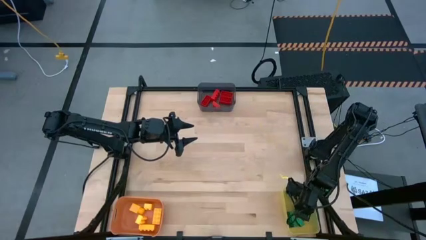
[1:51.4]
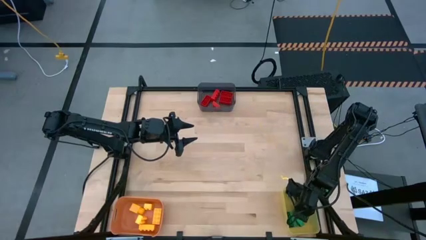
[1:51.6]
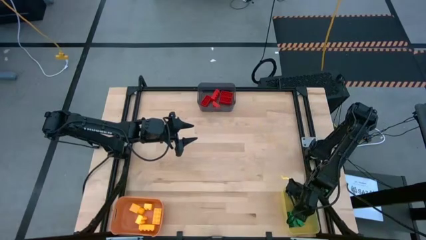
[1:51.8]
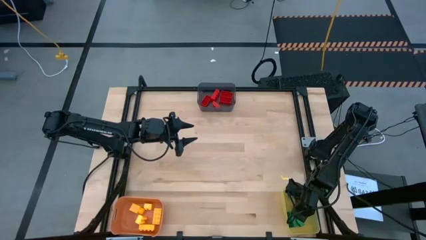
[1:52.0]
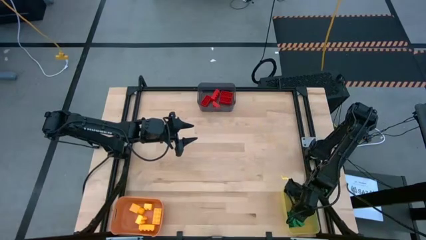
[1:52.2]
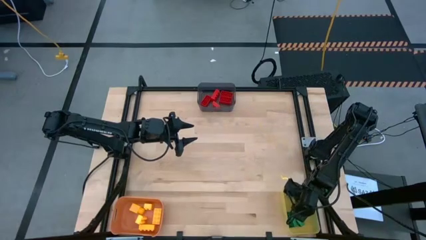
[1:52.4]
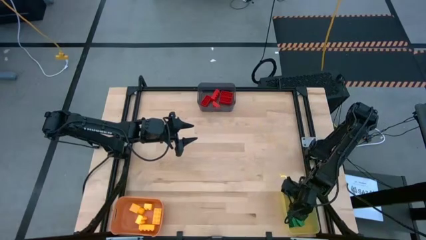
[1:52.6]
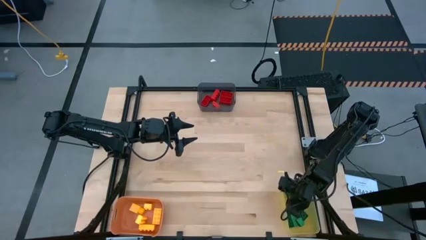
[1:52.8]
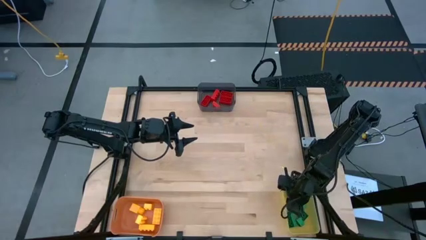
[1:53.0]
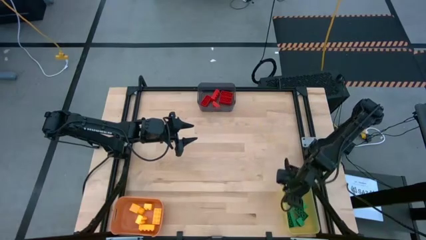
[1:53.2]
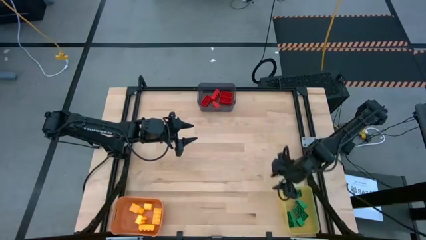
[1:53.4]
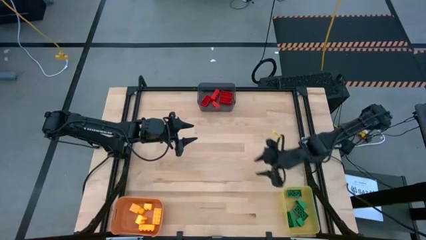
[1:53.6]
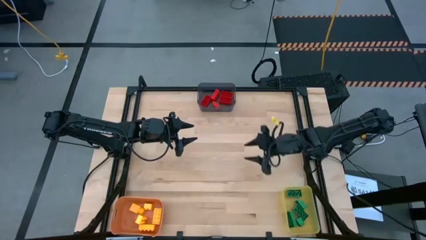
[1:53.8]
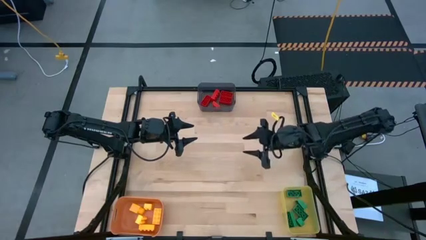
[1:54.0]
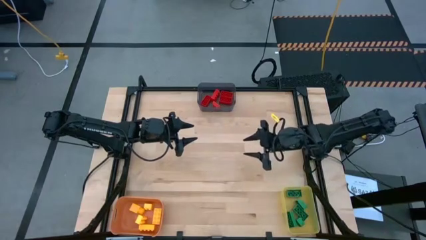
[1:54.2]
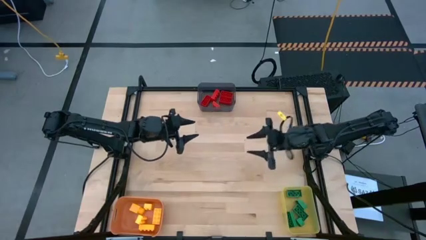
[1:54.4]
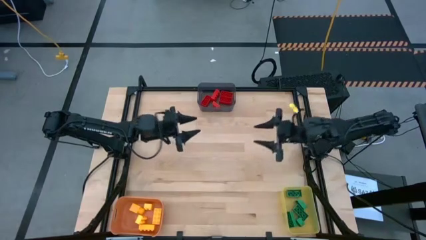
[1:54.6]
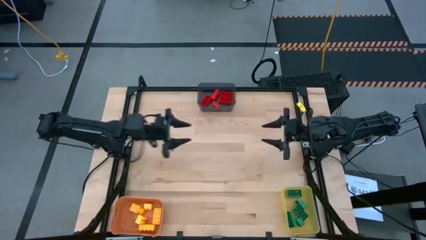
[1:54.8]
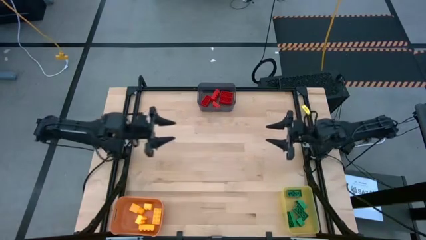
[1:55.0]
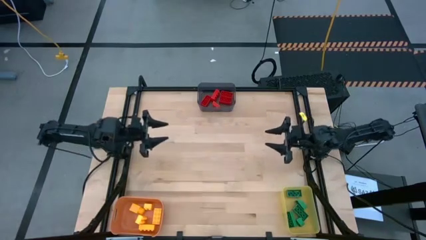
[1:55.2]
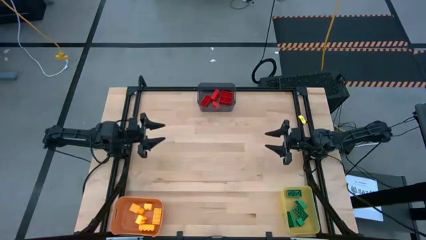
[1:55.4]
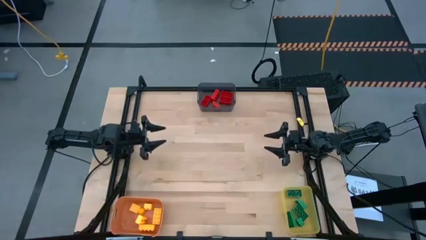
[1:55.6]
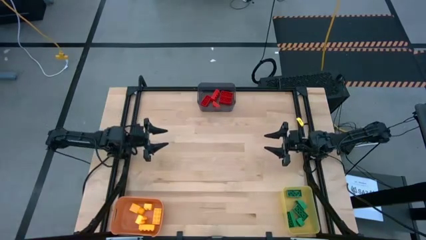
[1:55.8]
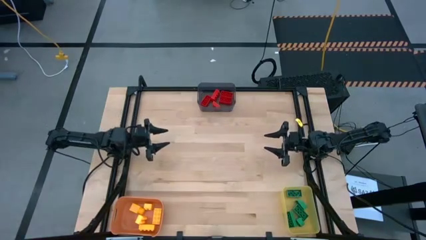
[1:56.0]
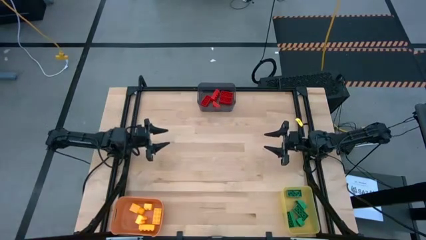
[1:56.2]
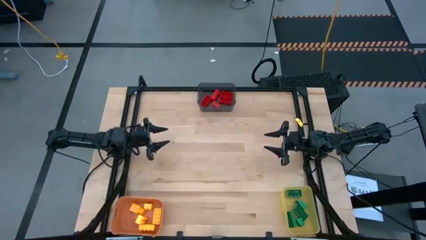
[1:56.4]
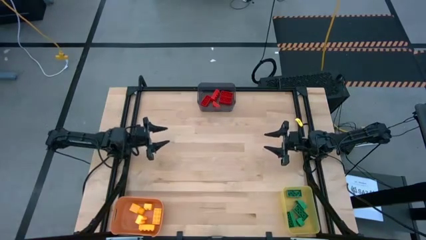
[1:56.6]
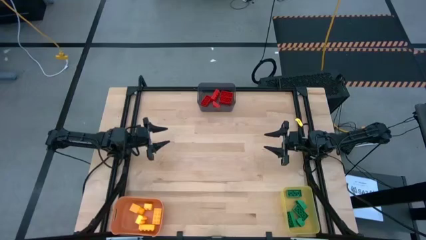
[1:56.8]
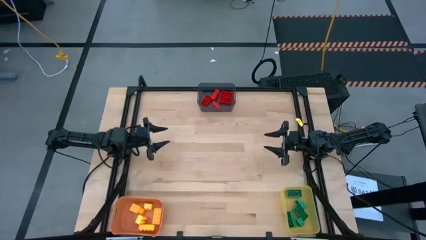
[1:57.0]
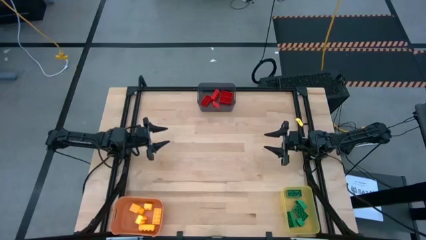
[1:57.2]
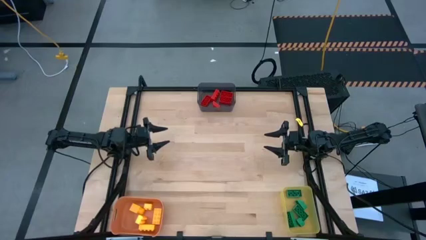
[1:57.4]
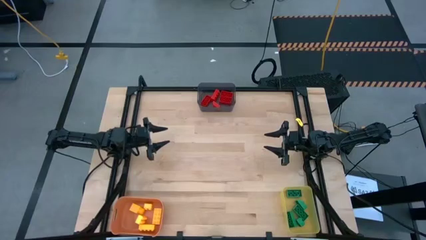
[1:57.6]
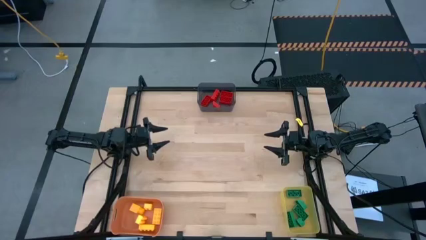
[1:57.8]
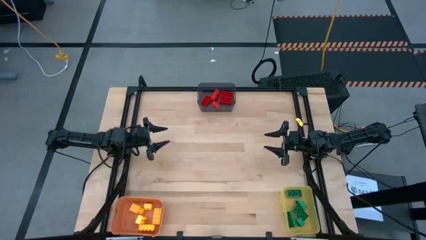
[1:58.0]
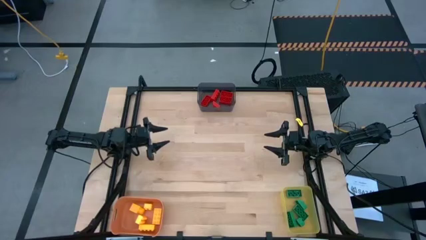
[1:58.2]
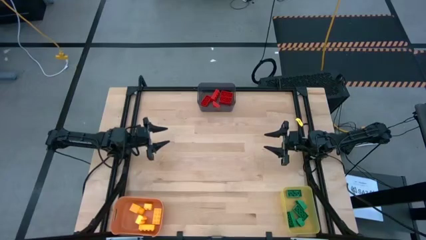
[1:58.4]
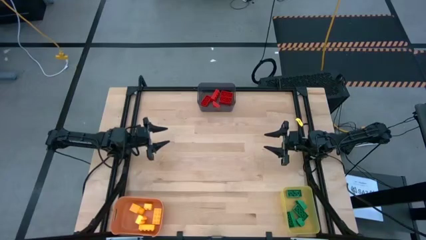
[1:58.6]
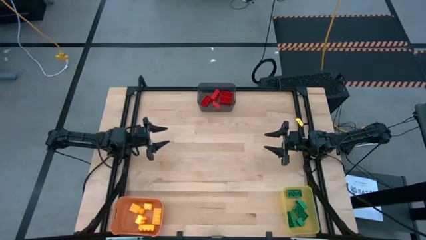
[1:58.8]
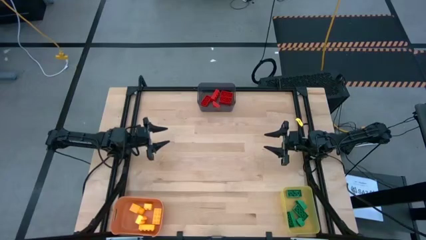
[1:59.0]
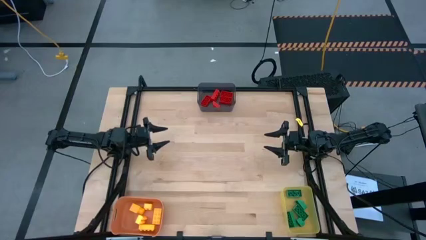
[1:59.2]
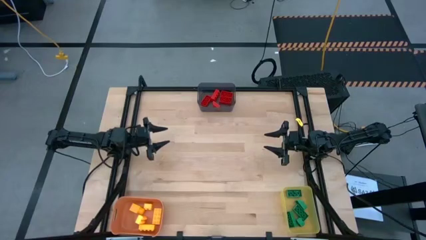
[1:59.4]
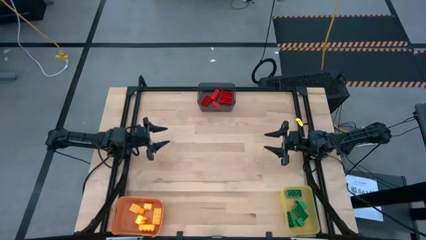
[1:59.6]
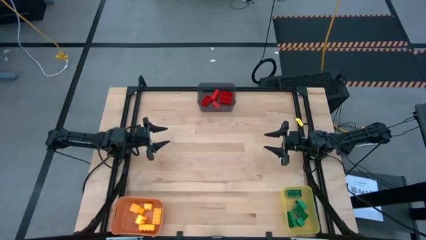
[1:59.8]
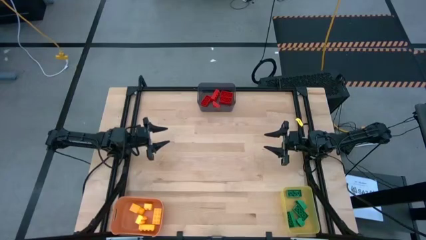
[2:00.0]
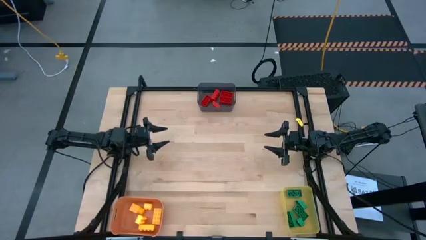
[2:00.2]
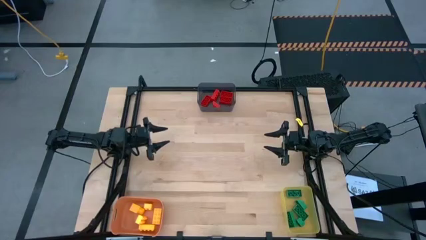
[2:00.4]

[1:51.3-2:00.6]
Task: Sort & place blocks by color
Return to Home Position

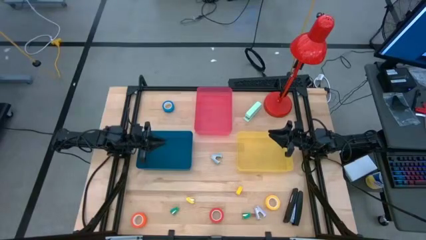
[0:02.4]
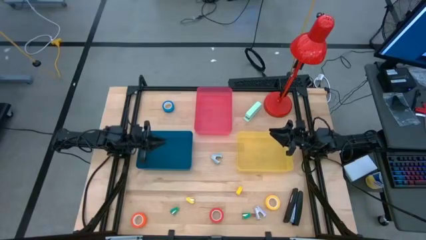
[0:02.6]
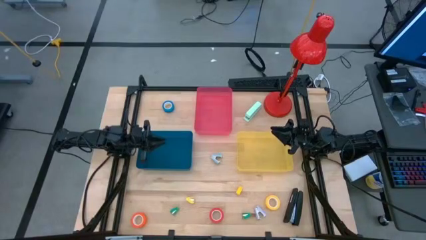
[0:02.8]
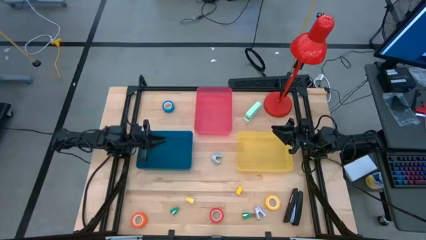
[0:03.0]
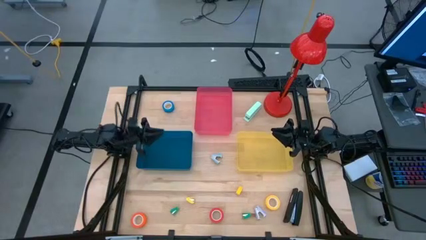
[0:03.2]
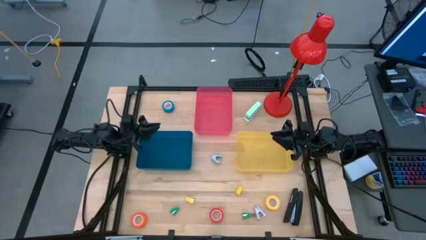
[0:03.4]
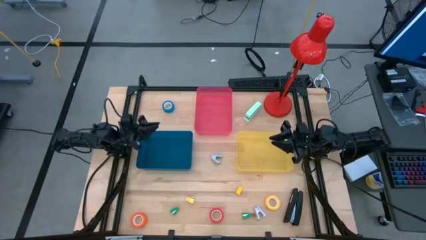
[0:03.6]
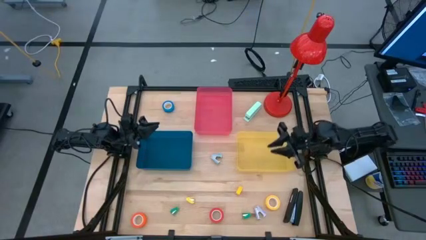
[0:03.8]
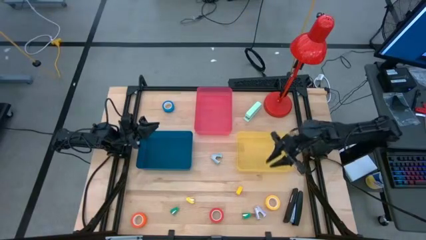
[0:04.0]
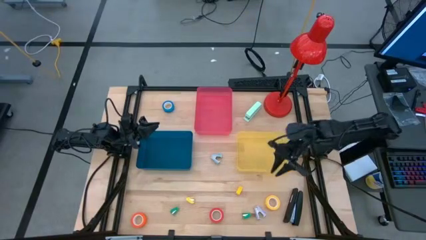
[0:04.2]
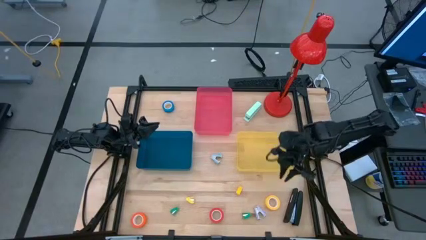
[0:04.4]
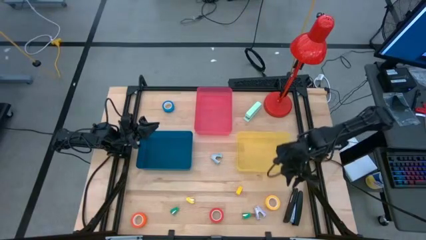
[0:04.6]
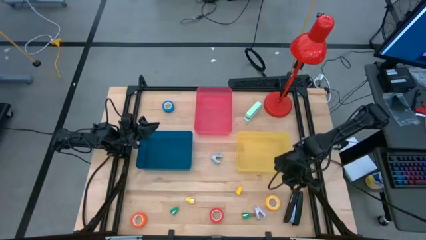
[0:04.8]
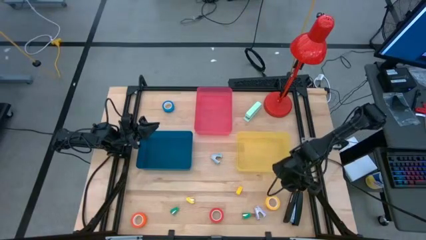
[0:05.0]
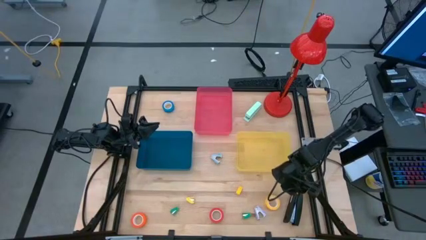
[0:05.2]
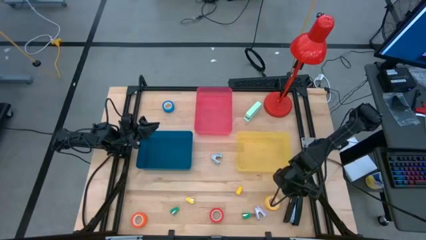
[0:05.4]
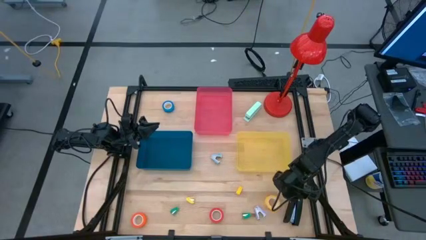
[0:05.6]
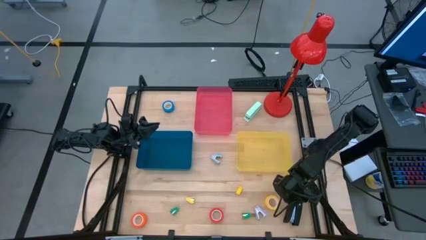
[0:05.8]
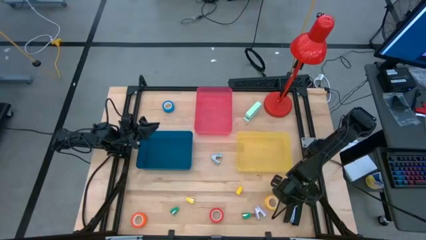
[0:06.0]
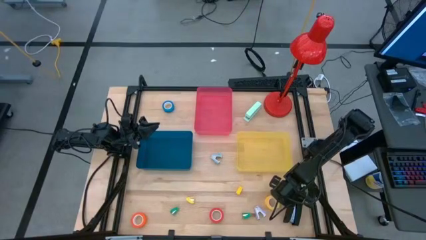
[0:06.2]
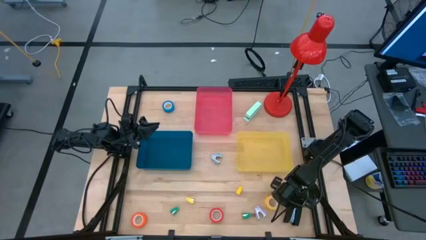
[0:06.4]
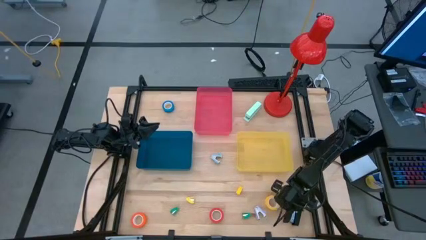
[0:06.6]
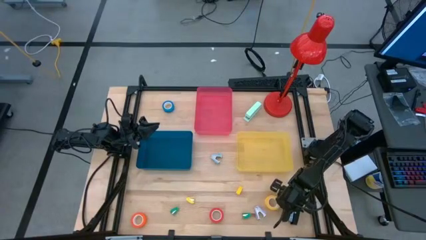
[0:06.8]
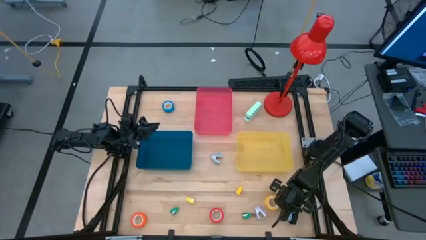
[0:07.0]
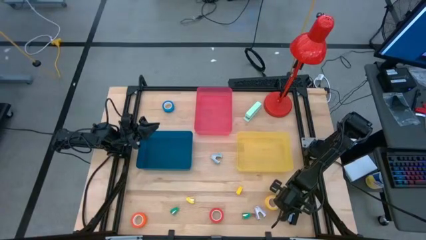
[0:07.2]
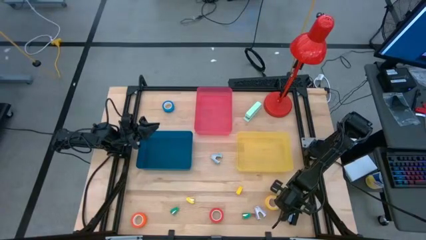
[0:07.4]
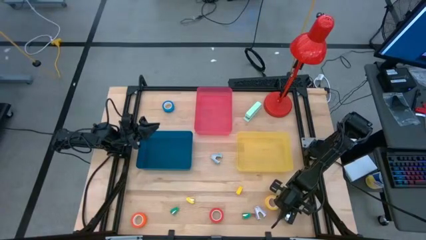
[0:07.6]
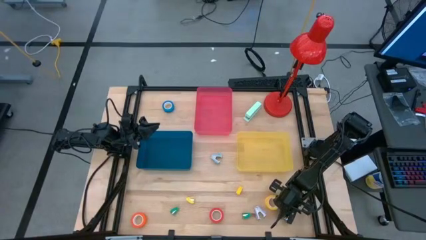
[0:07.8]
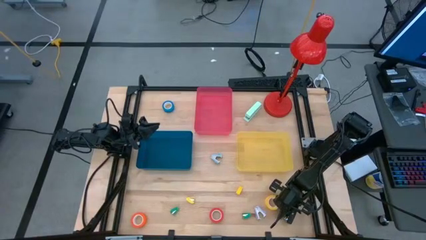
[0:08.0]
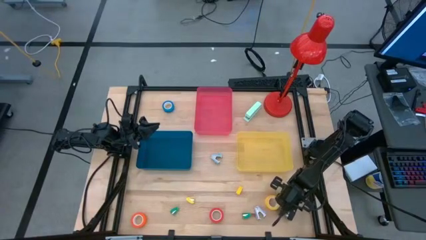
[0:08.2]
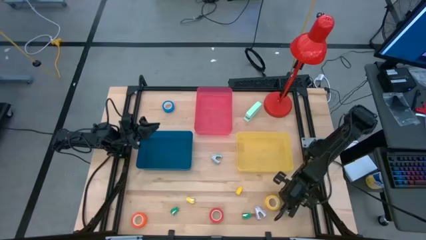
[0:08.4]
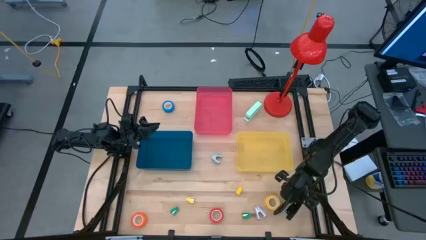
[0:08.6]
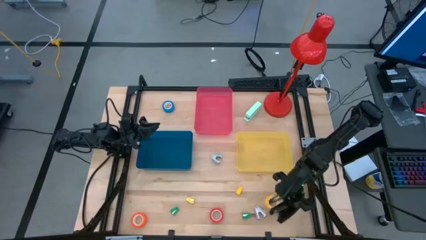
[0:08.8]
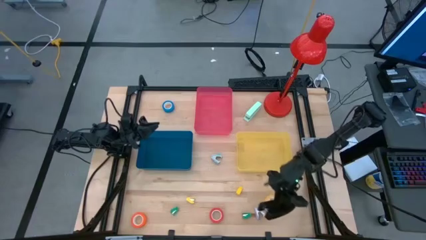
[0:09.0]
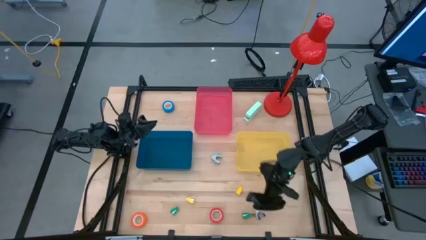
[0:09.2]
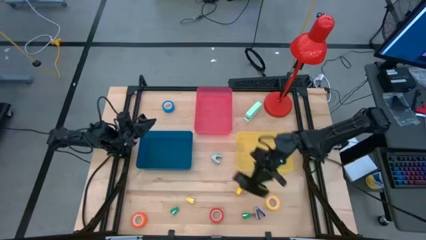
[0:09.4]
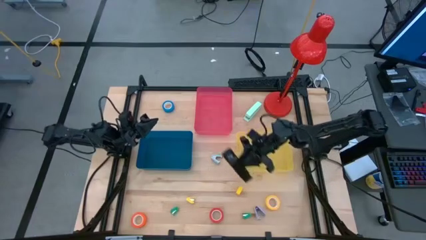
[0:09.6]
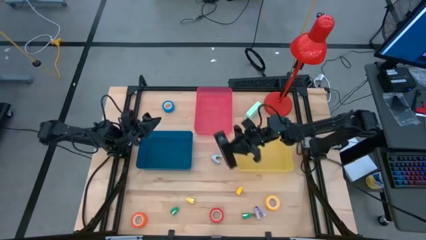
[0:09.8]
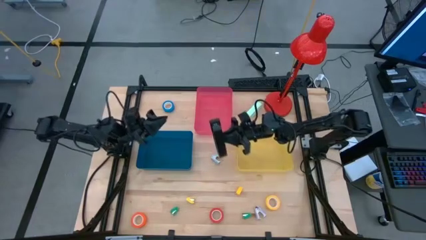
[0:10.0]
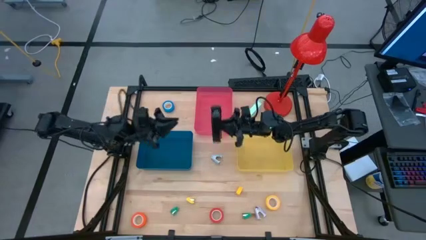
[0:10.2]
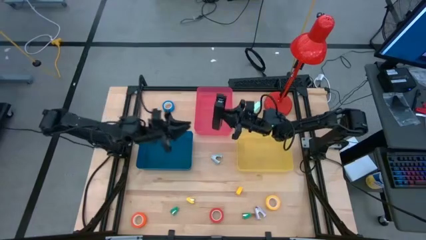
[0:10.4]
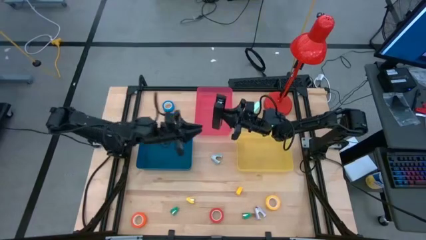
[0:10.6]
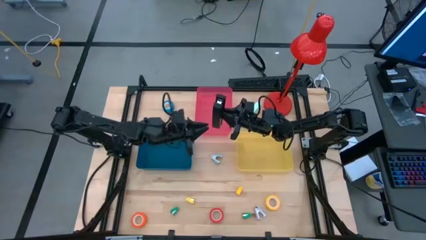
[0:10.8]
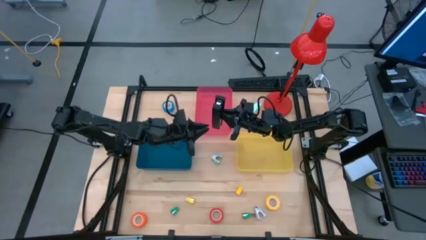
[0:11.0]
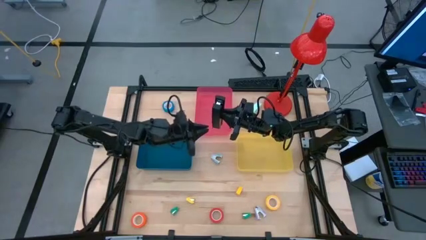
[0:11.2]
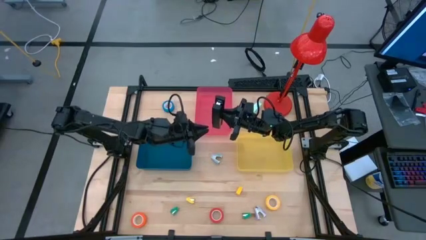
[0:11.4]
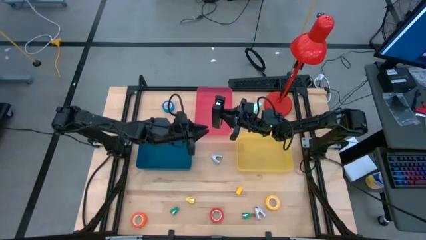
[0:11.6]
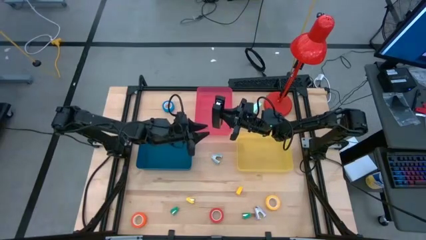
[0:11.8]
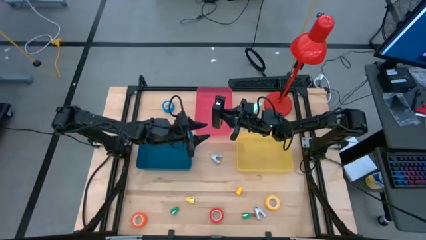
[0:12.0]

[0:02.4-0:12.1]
Task: Pick and place Stapler, Stapler remover, tape
Put the black stapler into the blue bin
